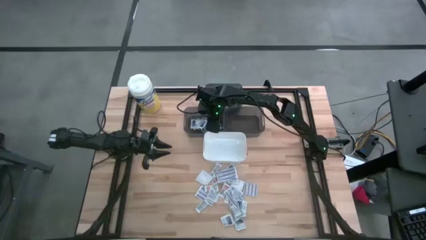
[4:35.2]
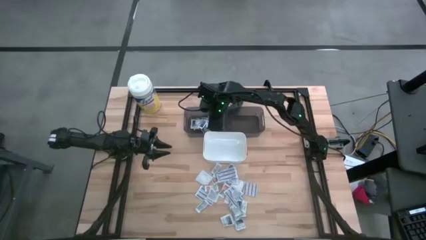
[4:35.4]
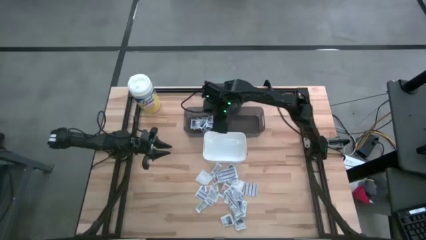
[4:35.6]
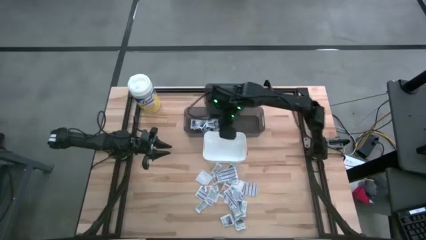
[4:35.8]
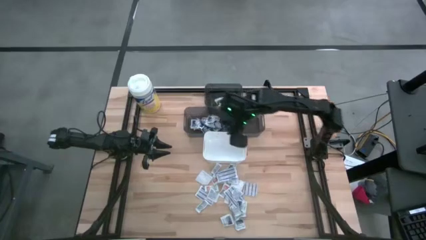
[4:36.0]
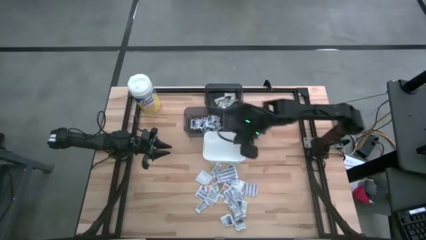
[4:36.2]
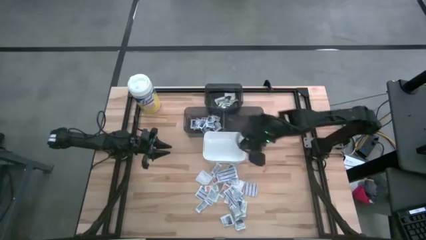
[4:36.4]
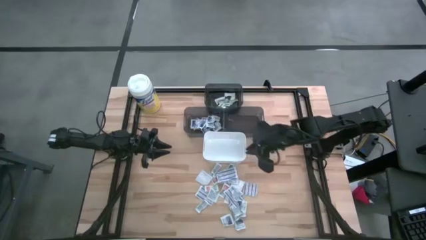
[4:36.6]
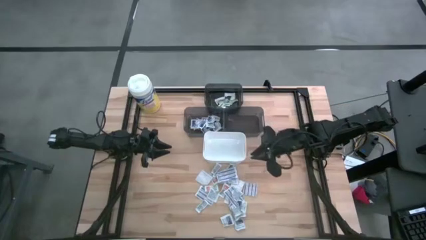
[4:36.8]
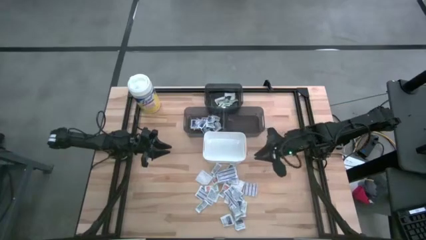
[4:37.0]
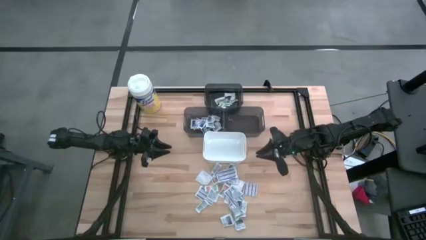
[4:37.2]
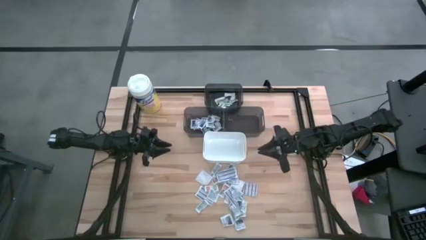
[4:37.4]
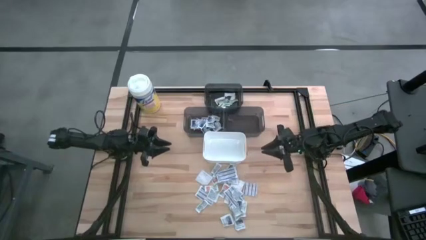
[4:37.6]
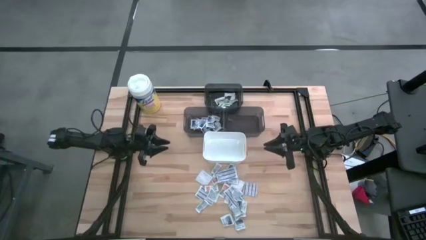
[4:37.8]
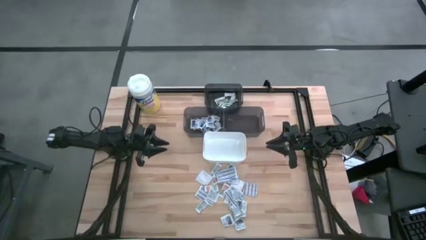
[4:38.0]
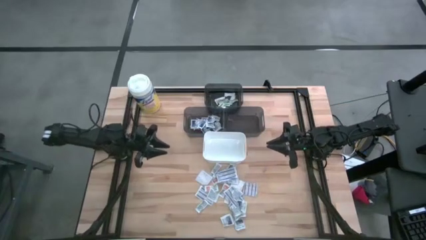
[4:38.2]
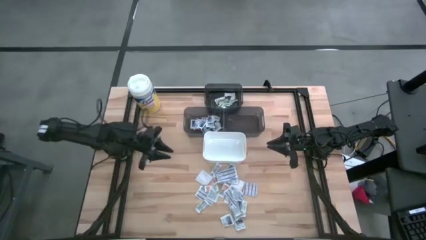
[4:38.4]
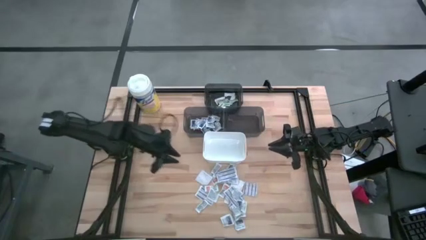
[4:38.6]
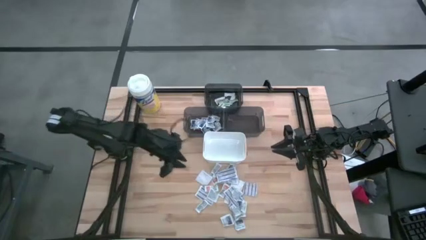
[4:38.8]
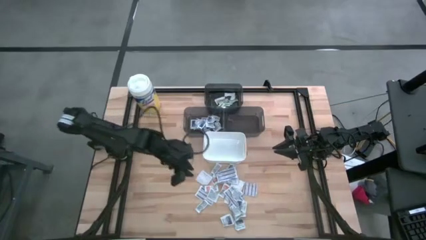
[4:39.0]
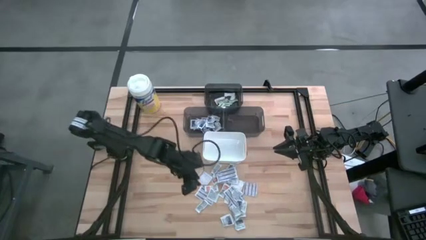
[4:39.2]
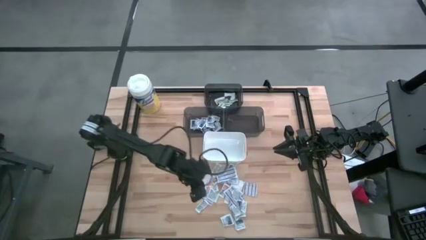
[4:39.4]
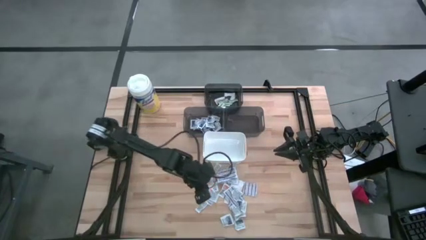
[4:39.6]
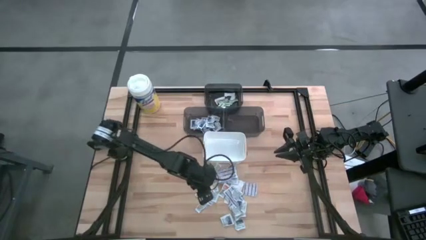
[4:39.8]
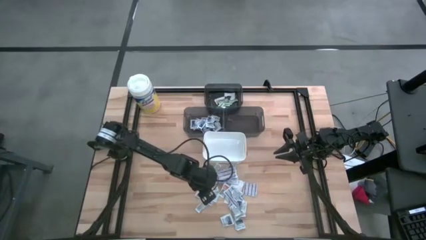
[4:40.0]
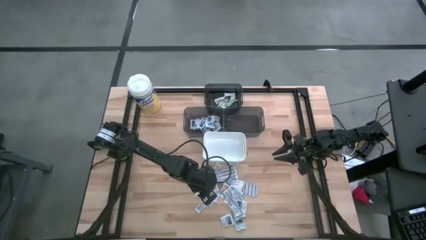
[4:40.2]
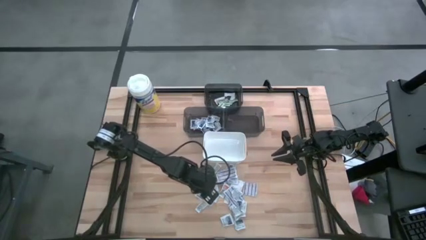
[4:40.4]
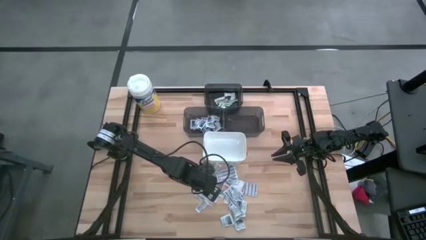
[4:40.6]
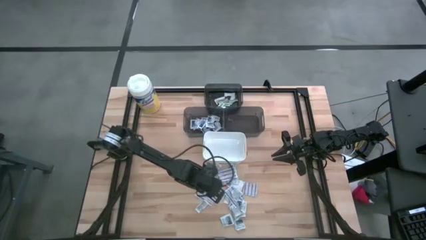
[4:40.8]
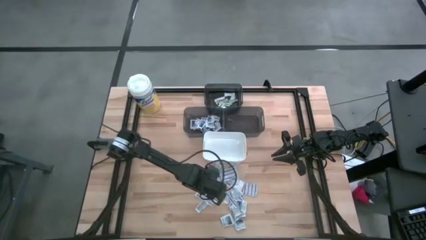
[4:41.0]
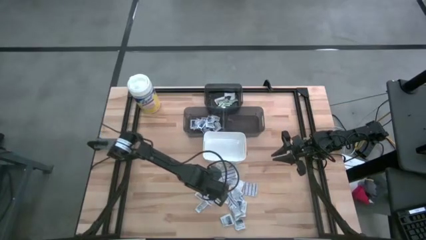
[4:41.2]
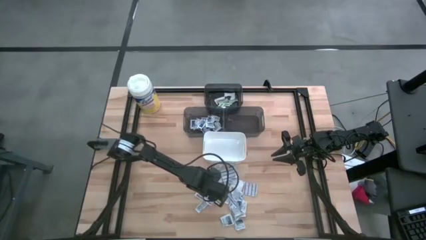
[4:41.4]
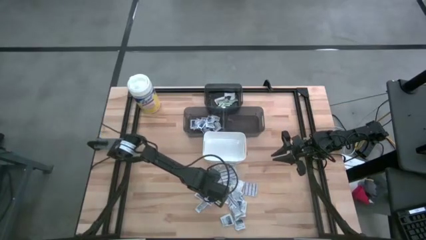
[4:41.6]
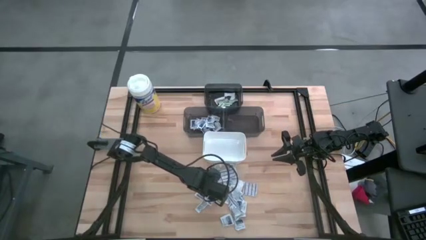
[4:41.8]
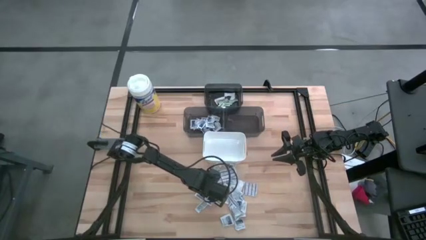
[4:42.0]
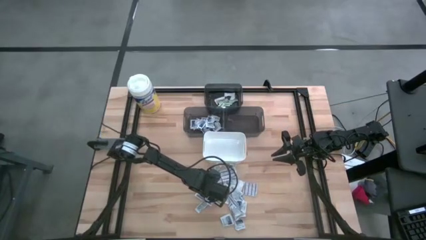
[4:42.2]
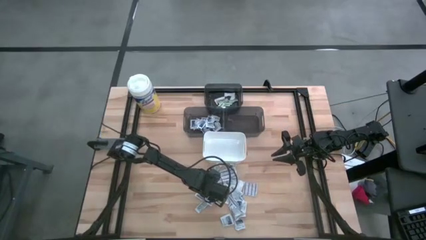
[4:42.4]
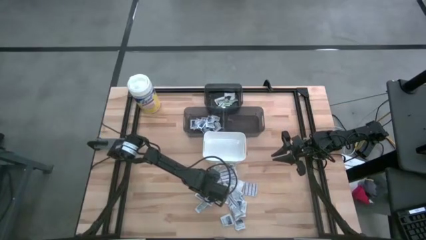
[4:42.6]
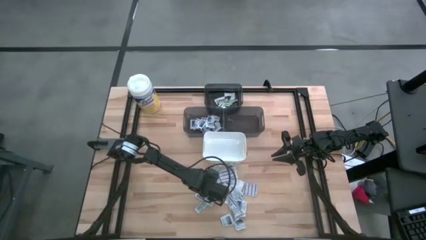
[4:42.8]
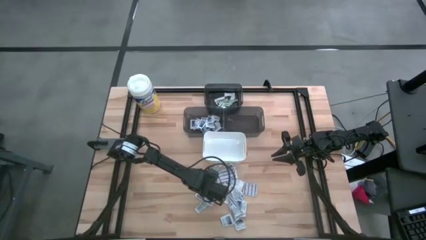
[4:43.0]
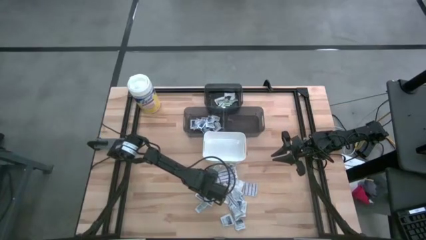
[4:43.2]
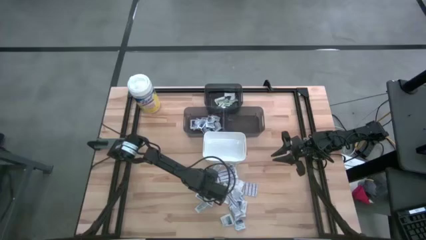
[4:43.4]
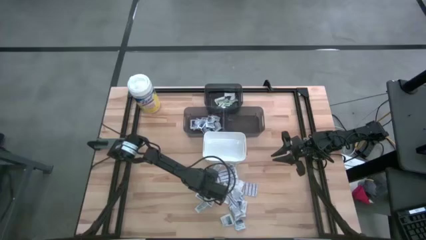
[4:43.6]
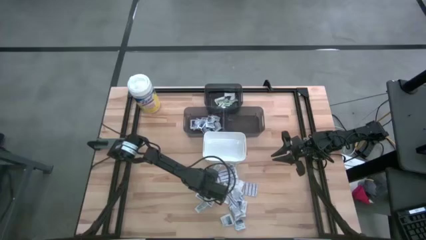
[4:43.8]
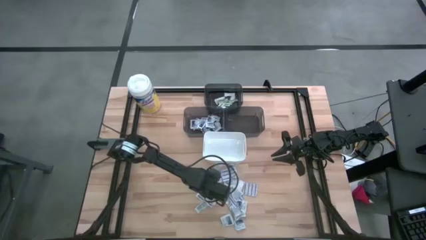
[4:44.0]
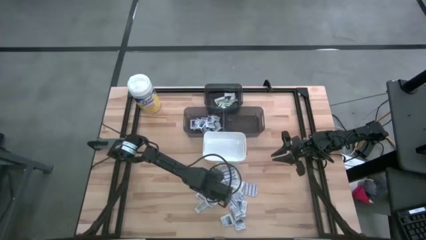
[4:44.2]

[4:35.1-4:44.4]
Task: Pick & Place First Aid Supplies
Put the alcohol pad into the left black bin

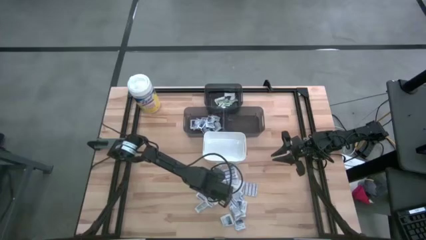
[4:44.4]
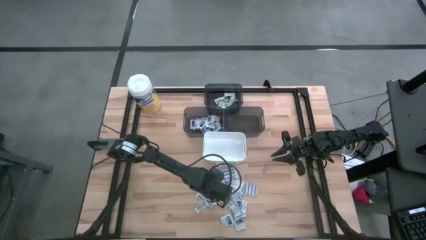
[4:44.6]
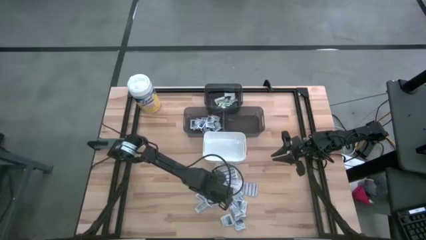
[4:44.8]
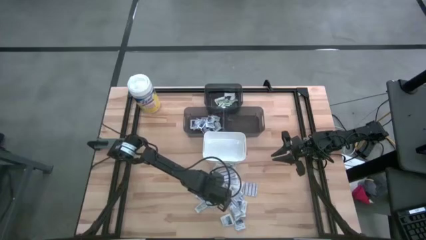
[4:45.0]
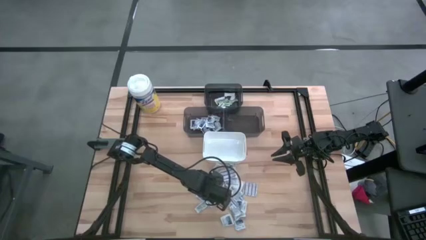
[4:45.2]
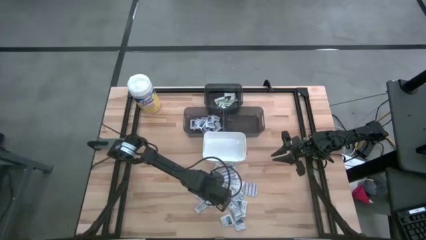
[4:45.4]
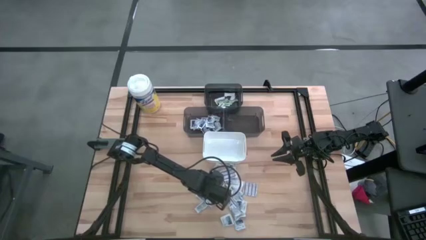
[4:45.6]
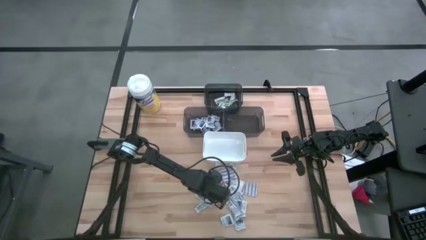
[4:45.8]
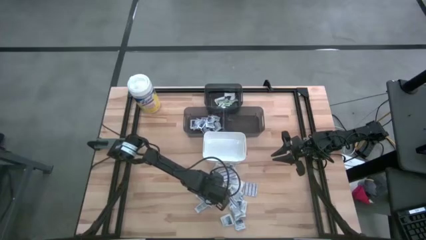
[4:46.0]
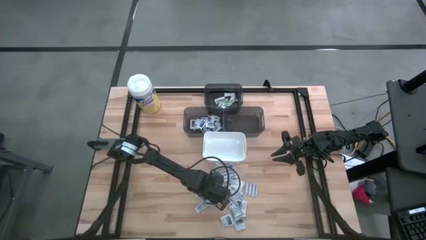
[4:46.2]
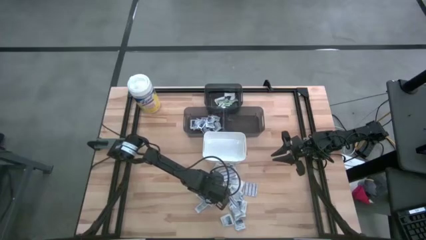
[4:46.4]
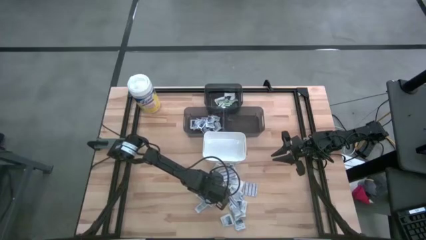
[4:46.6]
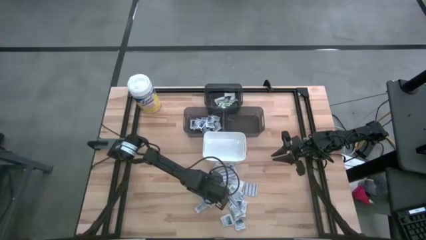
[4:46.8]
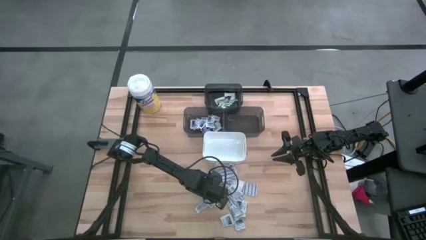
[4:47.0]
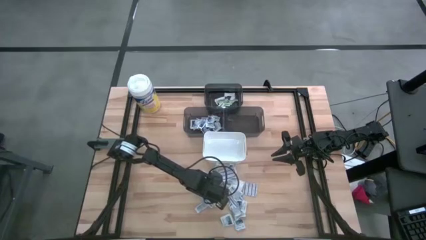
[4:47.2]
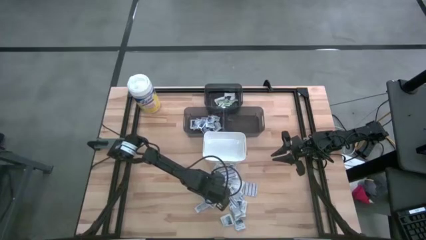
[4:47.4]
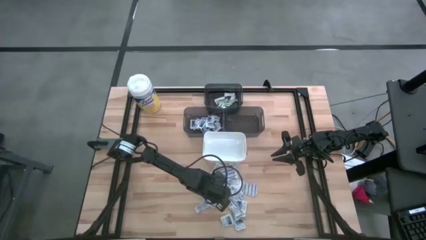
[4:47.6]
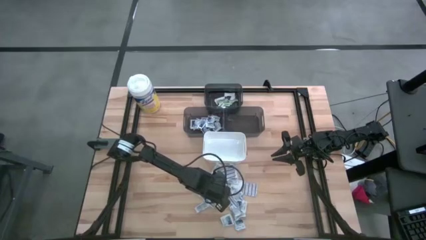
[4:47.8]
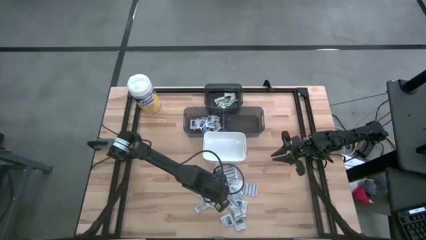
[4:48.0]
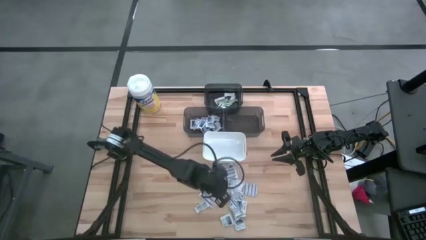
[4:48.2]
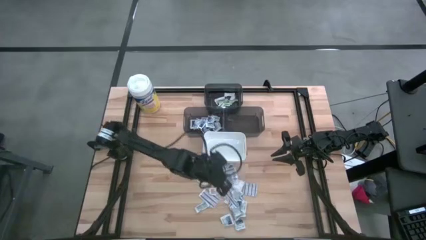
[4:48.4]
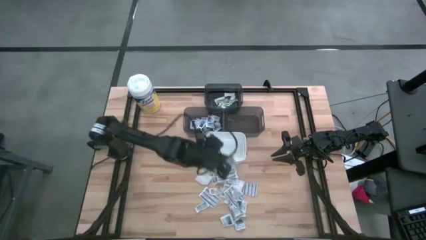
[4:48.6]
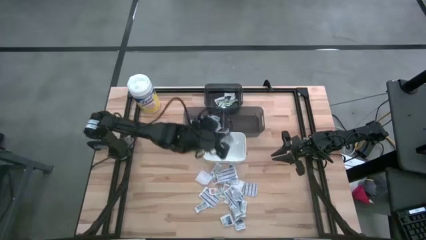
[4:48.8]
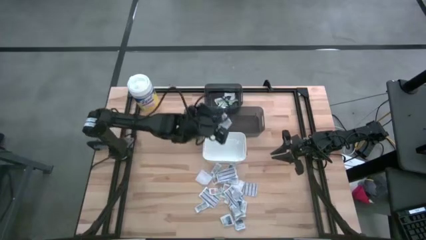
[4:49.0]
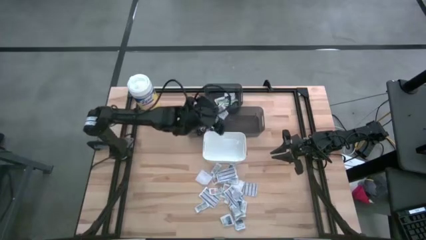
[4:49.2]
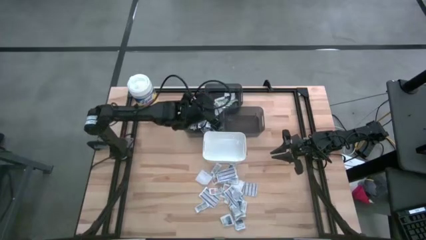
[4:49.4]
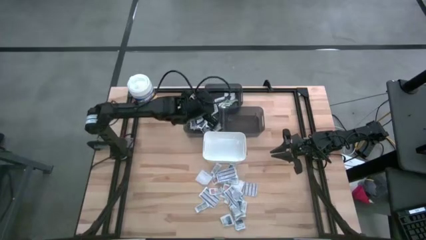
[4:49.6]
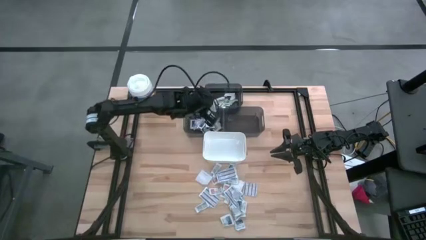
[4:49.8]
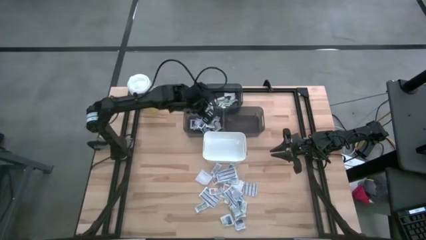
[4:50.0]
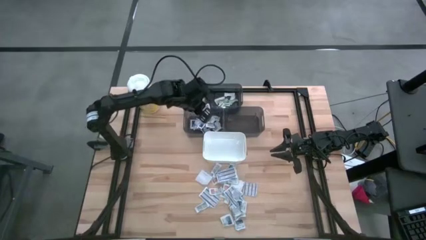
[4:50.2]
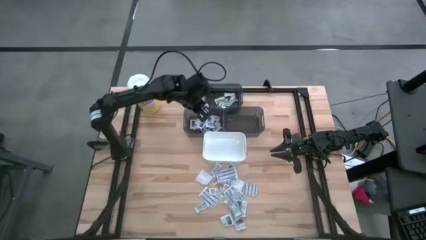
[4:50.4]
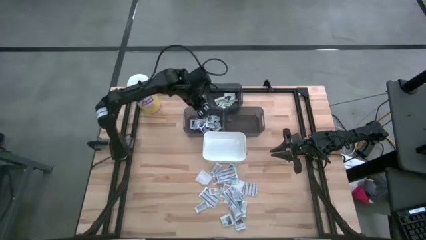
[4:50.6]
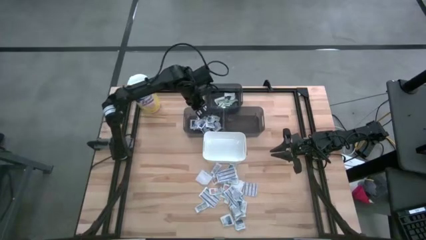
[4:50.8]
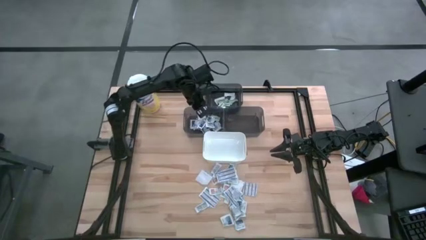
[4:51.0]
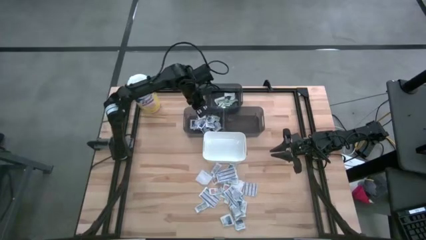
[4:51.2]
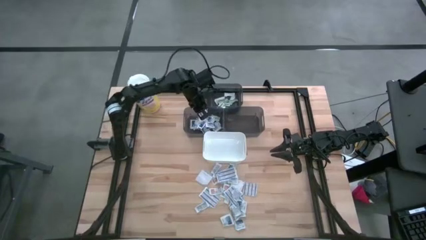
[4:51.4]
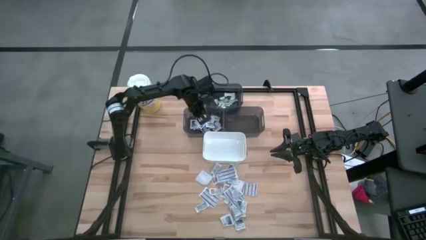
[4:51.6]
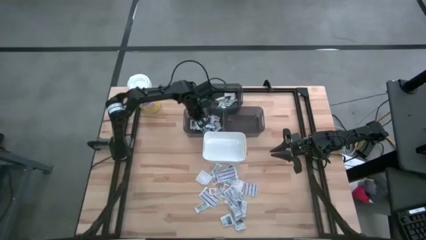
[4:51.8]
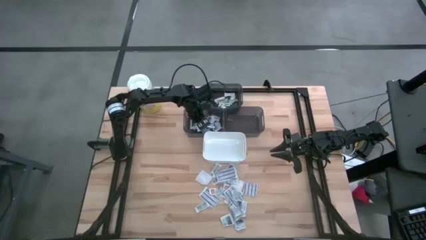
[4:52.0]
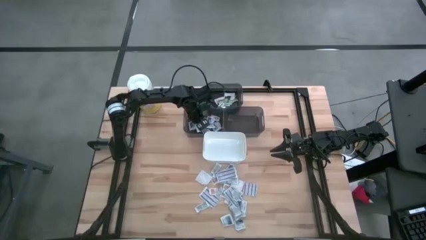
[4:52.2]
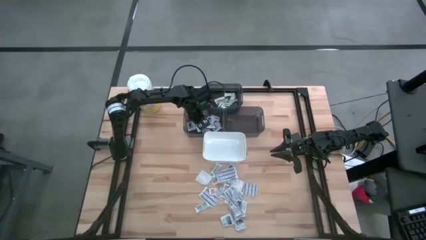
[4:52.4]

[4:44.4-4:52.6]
Put the alcohol pad into the left black bin
